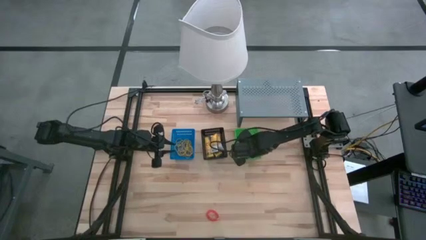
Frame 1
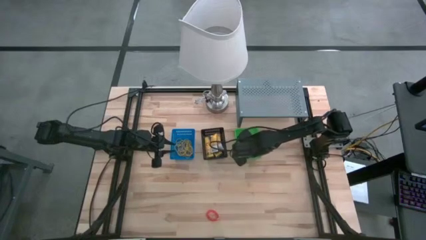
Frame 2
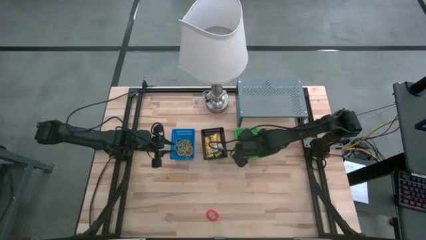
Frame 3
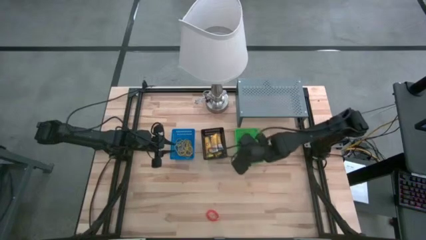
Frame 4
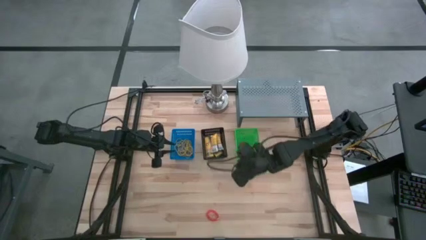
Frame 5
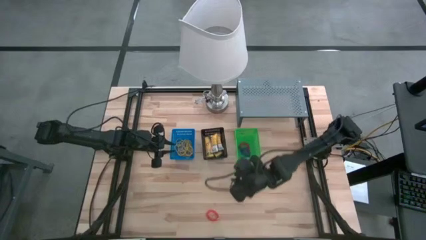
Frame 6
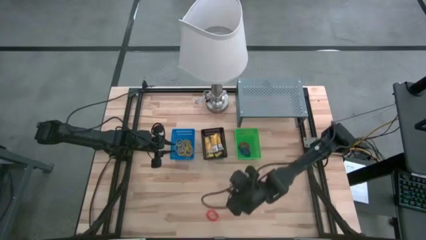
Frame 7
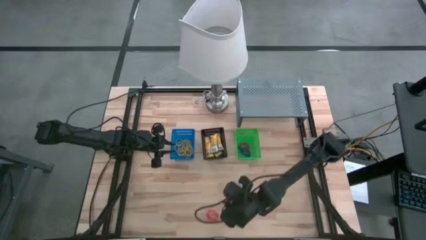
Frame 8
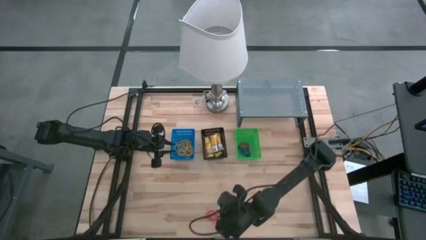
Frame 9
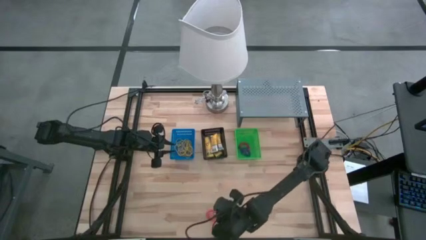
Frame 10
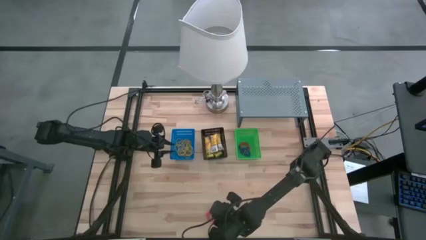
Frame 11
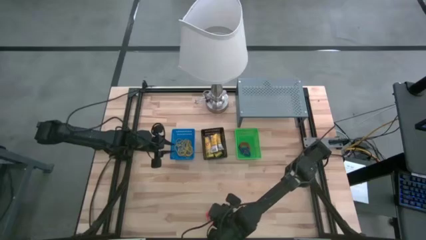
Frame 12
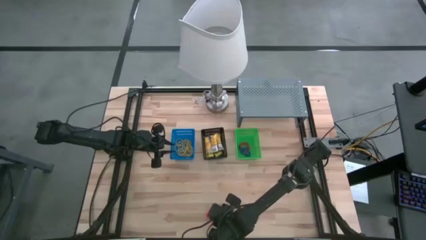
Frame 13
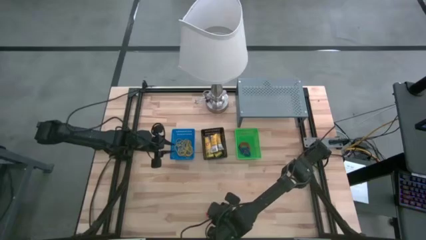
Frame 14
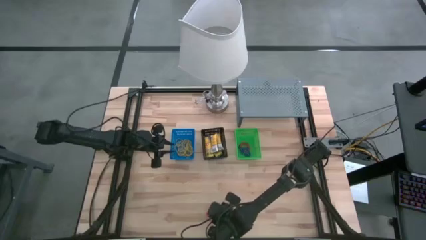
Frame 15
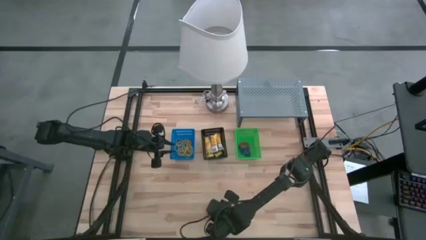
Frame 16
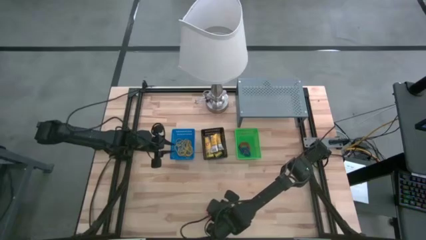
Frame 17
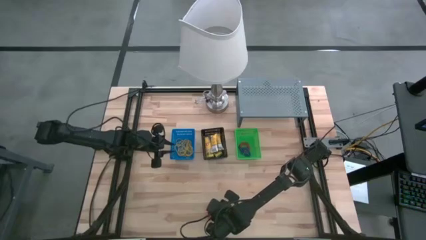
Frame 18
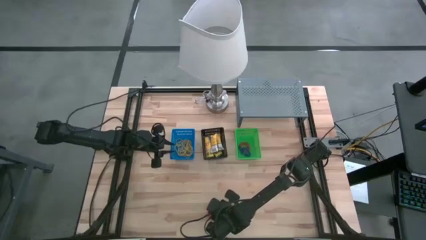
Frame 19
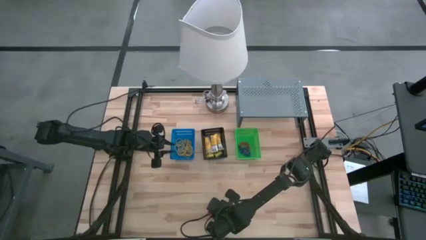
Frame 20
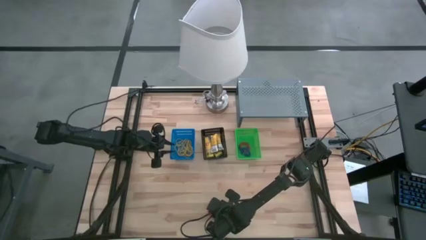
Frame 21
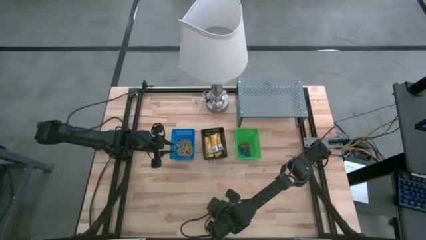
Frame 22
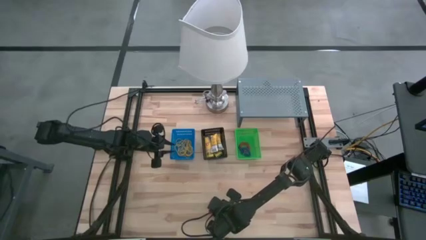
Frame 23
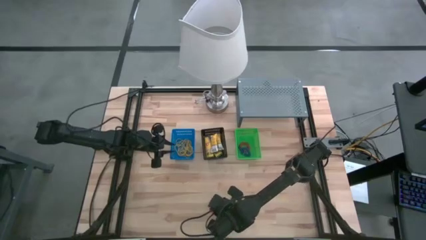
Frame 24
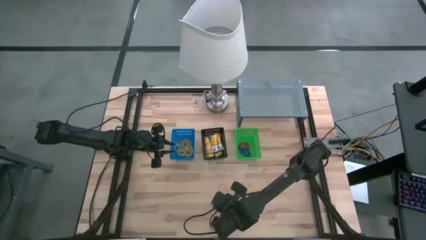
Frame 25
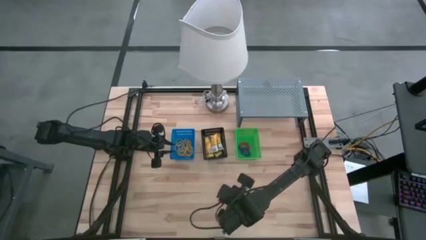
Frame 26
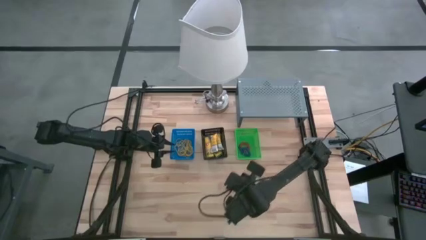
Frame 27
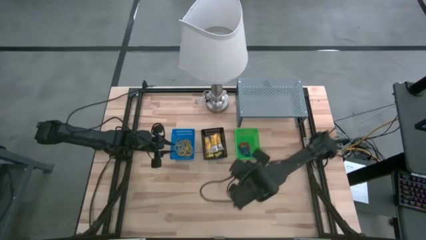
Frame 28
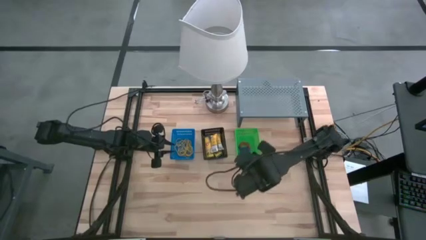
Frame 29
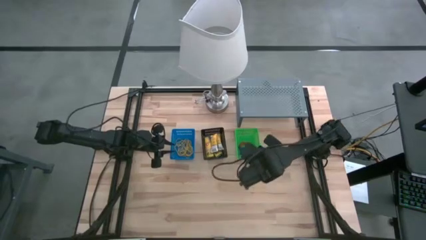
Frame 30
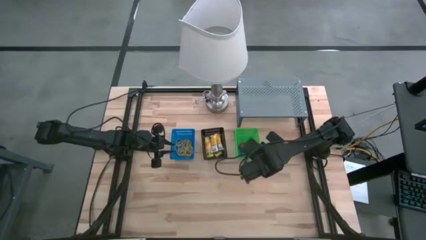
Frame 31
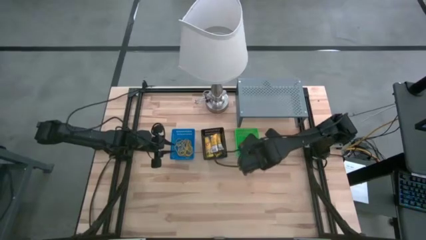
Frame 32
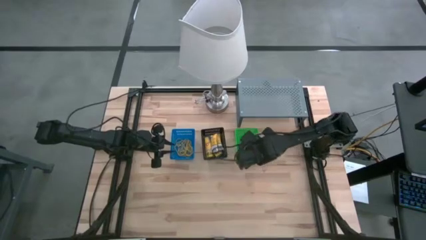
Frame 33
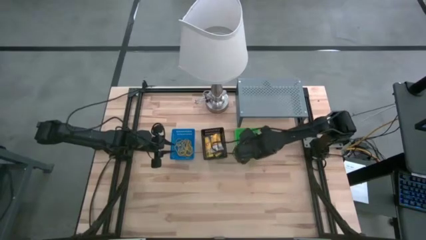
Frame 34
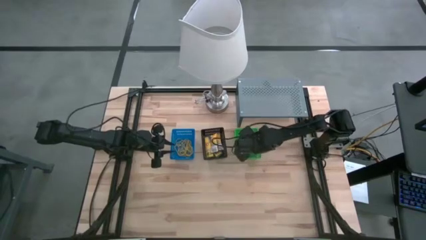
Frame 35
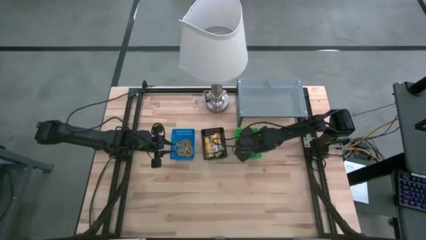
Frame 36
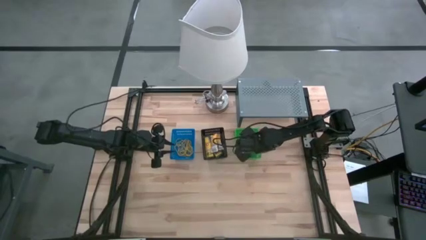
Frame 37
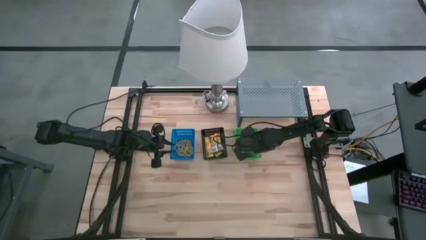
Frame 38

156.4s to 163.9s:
Task: Pick & Place Office Desk Supplies
Put the orange spring key chain into the green bin

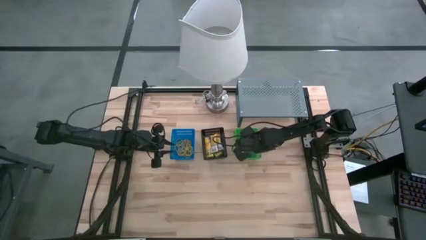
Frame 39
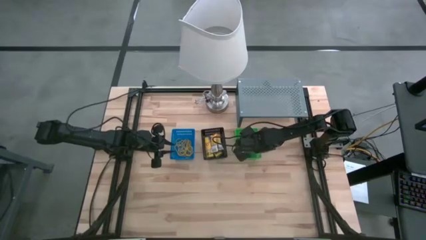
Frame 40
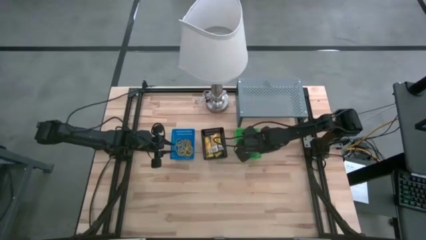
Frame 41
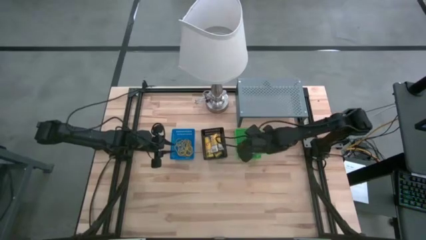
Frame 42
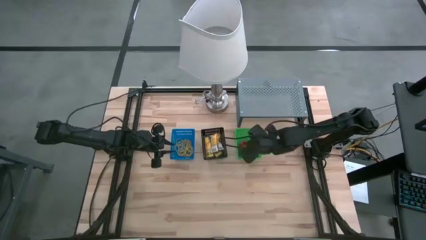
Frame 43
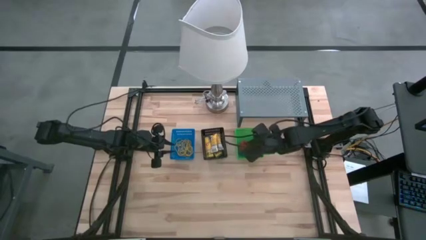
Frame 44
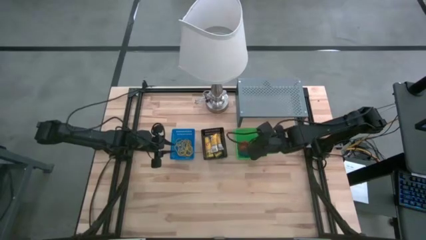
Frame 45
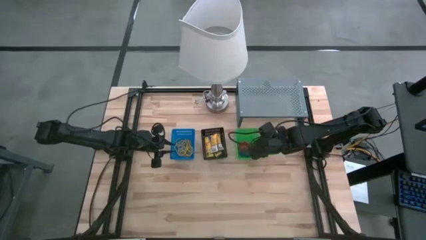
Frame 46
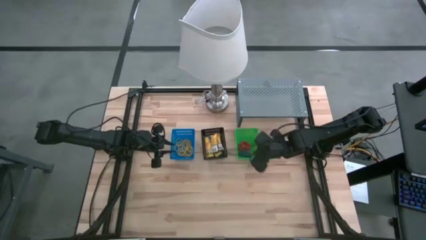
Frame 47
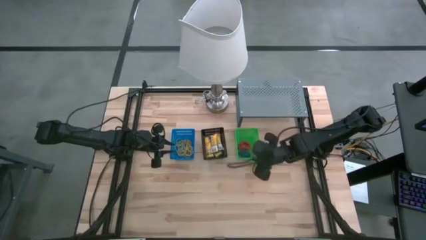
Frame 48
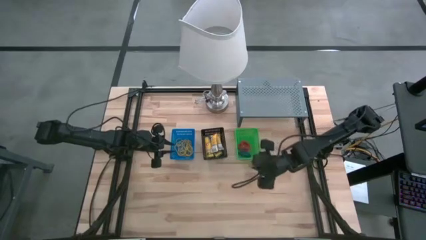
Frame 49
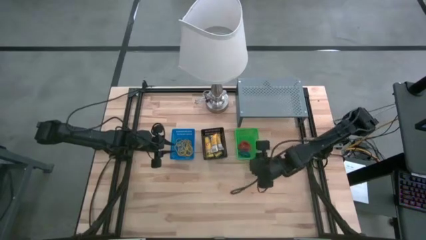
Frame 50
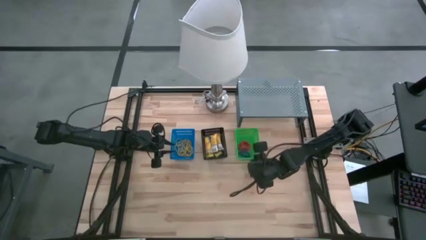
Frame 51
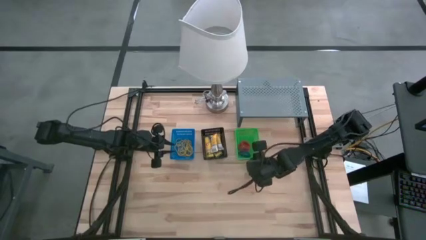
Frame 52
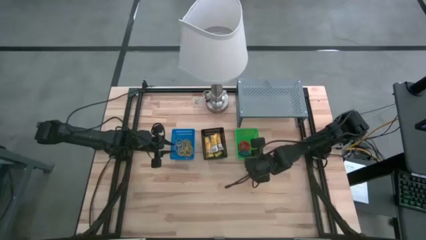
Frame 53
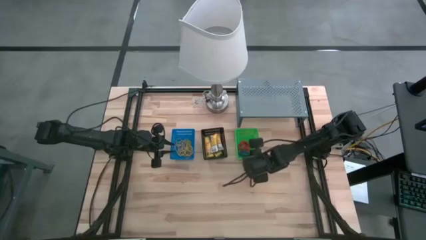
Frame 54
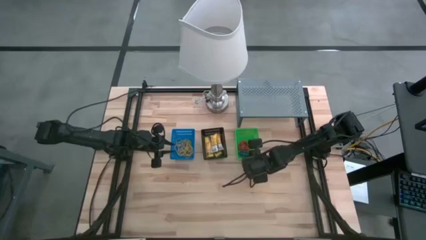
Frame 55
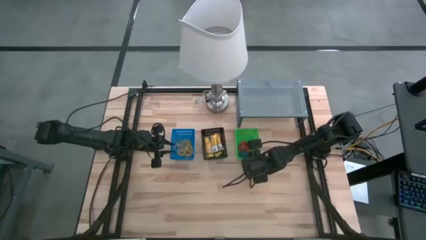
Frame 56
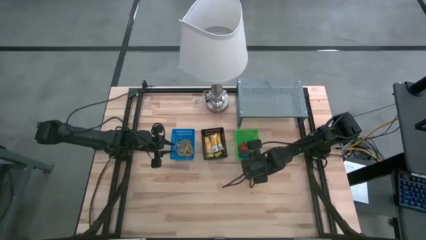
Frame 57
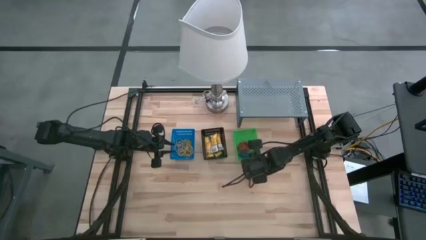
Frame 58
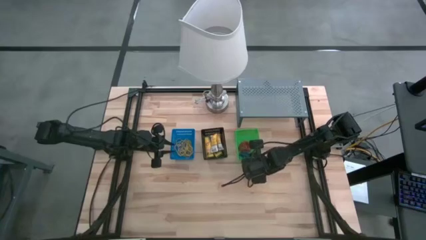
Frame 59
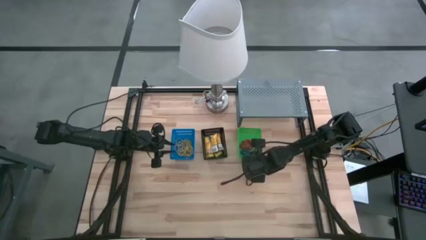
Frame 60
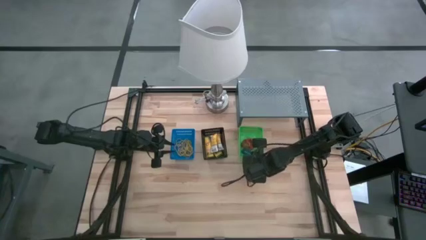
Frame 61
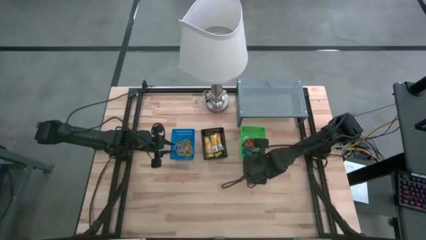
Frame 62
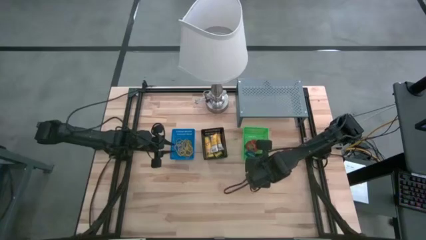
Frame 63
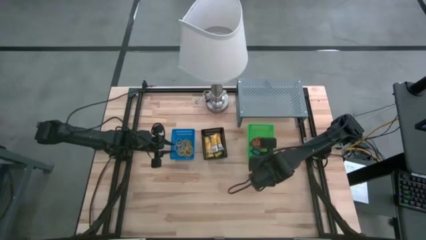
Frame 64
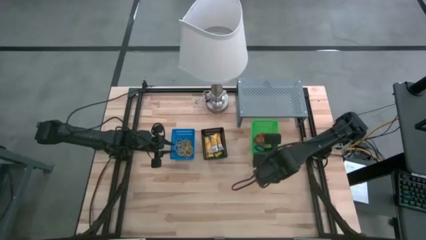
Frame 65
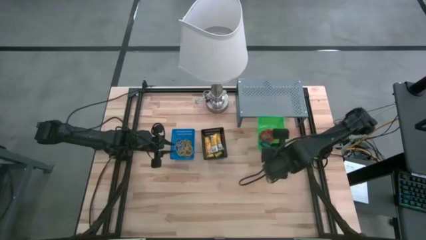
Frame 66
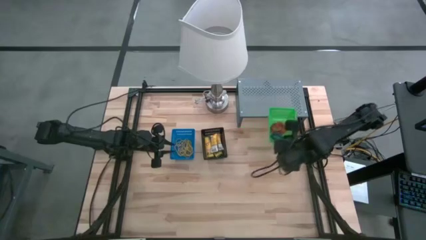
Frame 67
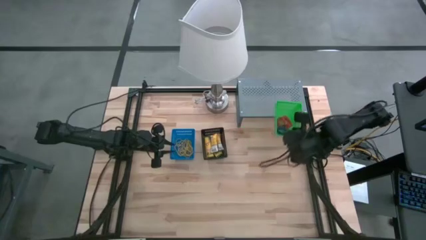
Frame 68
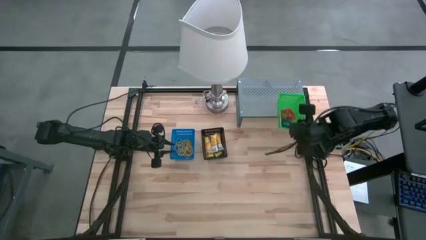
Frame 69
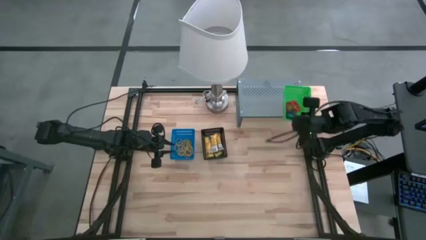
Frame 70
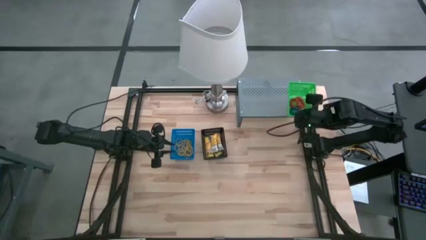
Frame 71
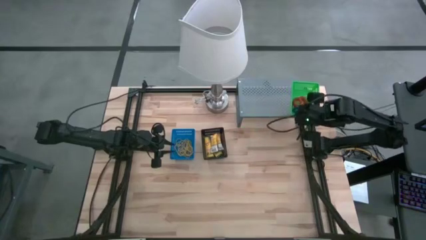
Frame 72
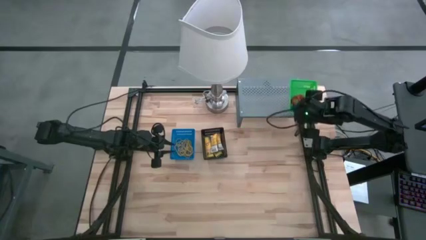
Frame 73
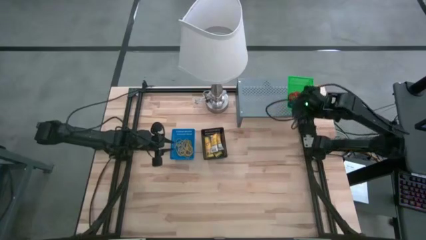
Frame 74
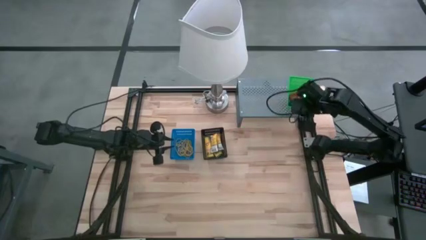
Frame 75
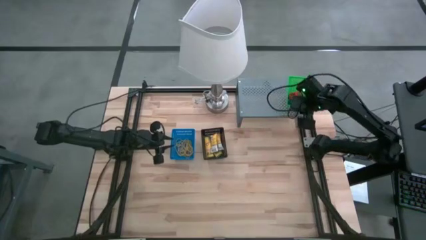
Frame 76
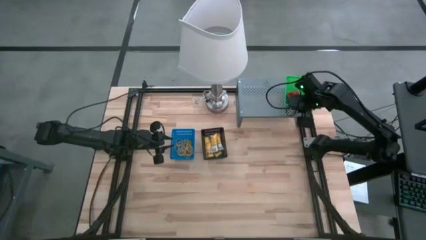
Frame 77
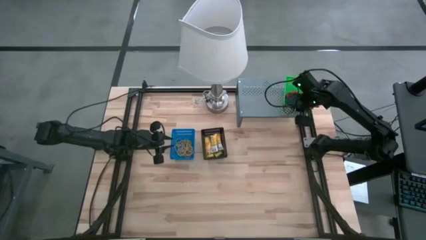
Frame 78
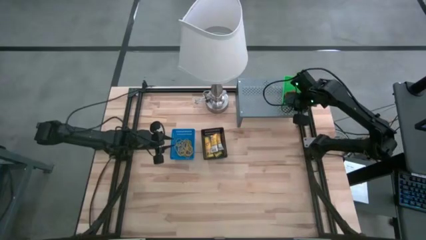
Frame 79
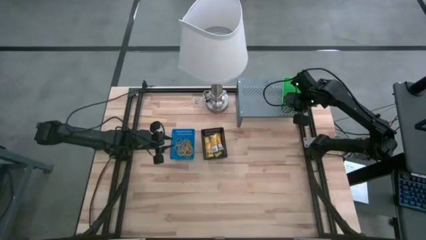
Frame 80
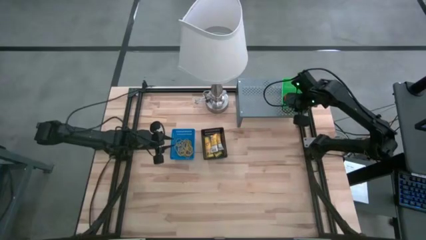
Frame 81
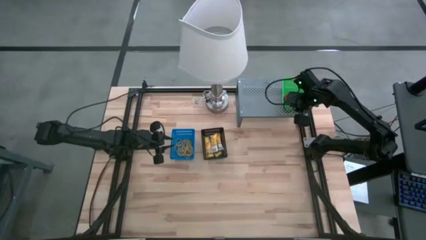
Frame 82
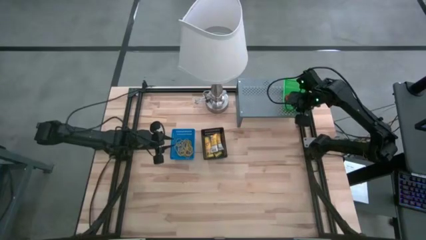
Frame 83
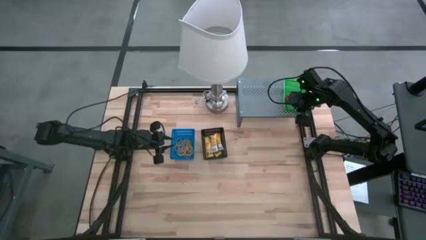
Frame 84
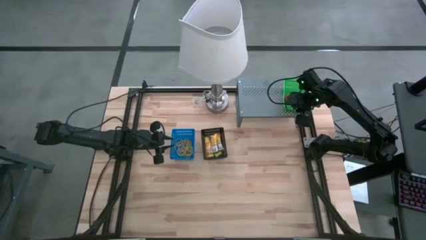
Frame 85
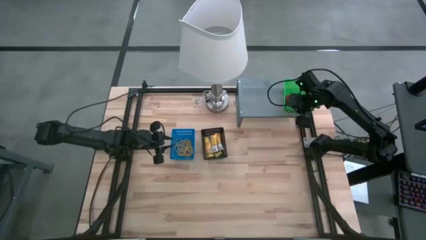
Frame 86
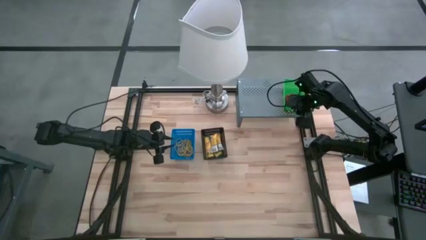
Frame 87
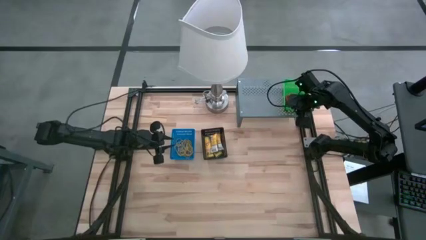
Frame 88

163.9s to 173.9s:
Put the green bin on the shelf
